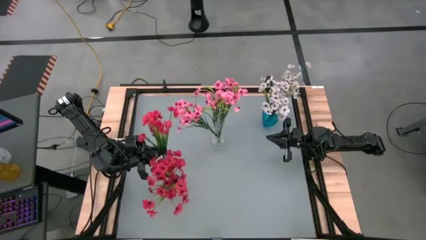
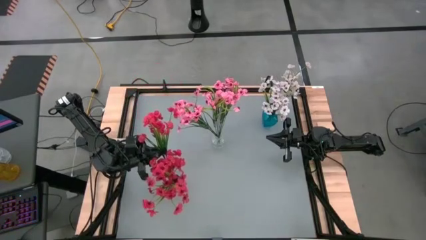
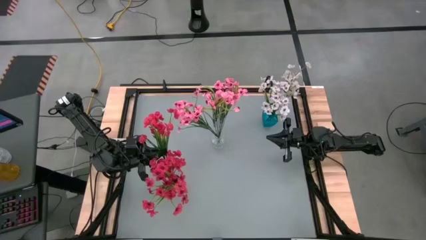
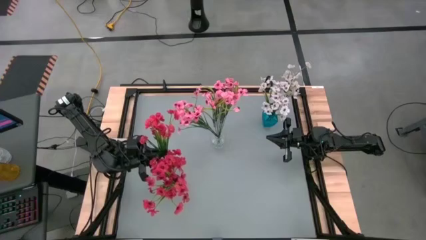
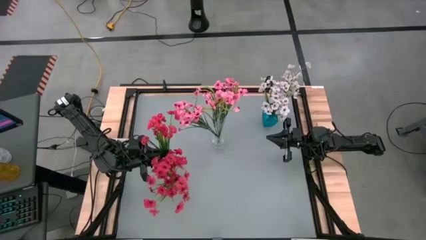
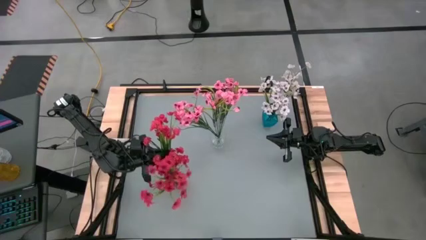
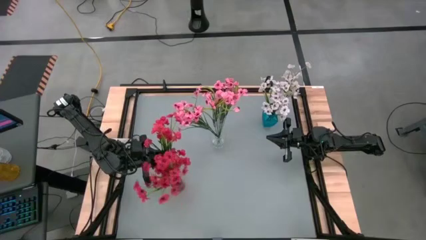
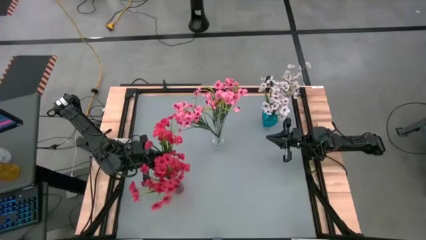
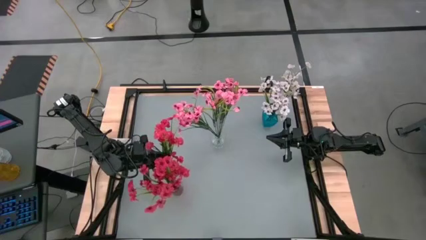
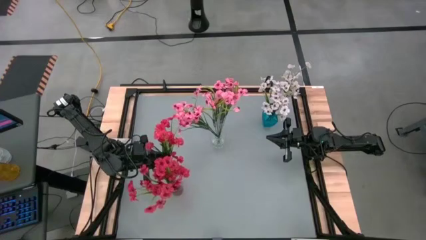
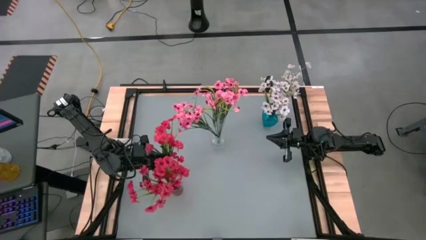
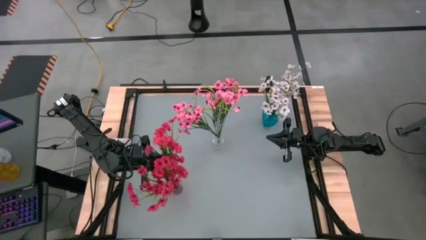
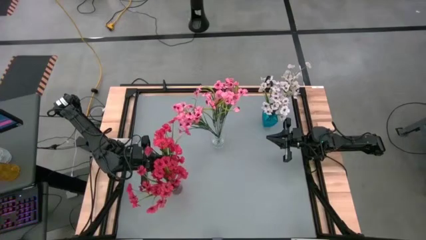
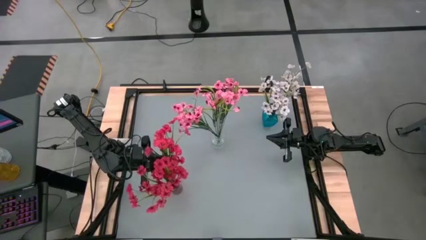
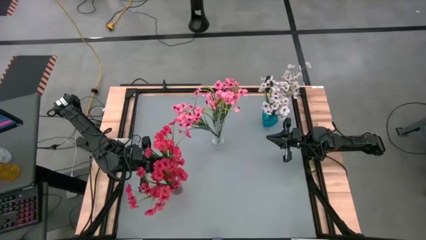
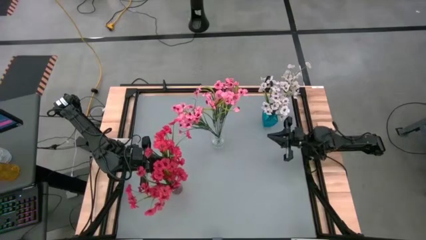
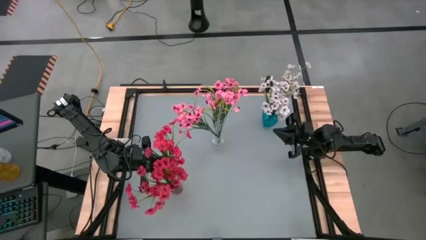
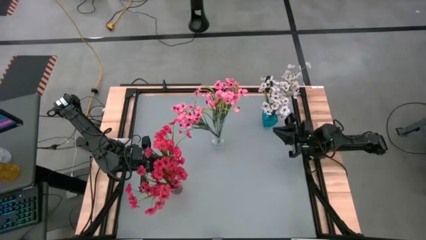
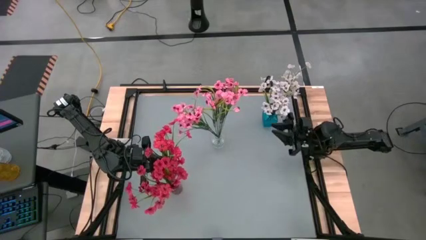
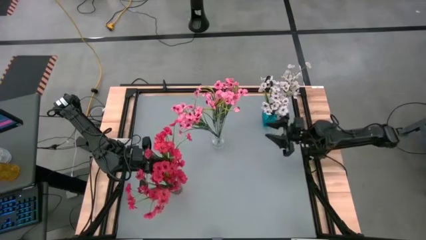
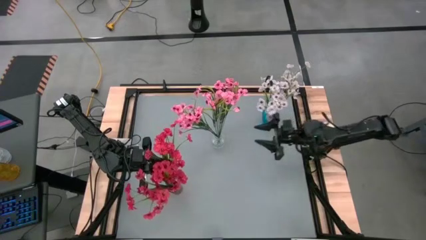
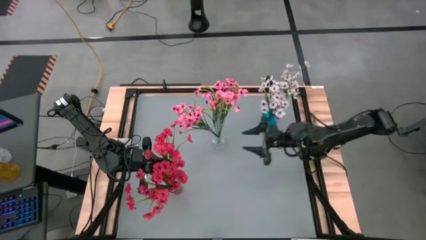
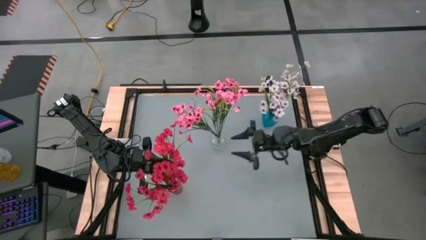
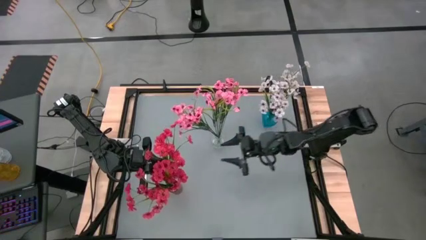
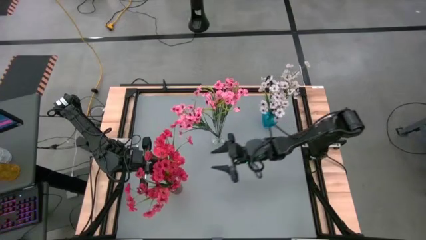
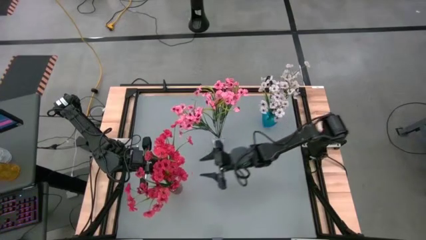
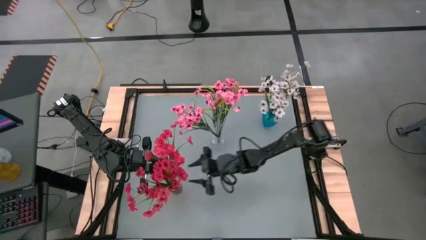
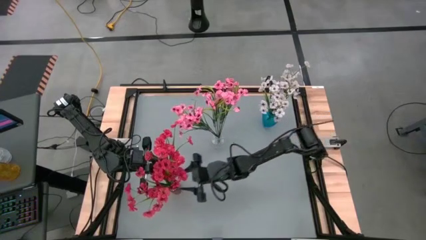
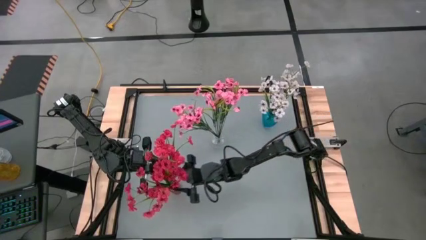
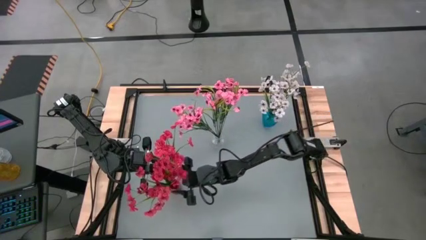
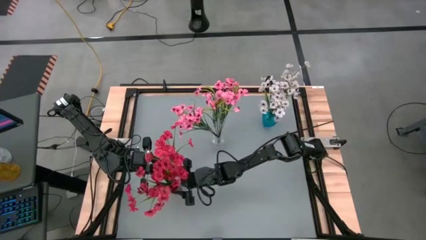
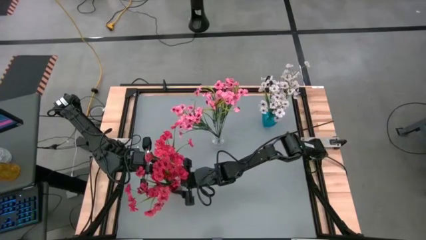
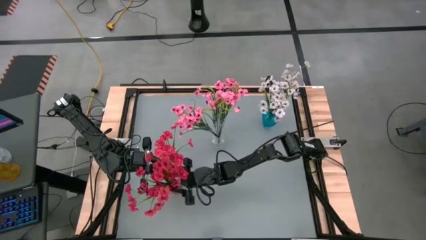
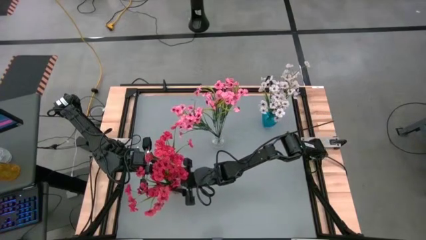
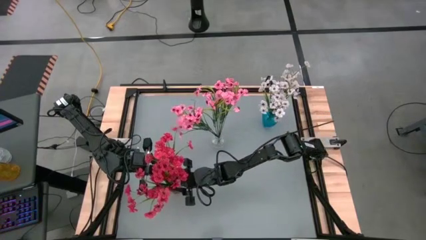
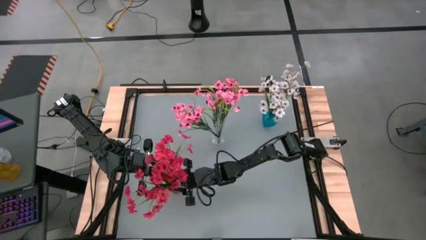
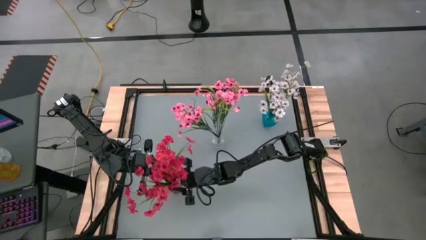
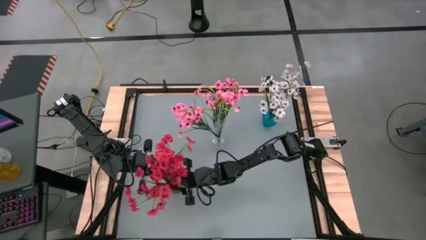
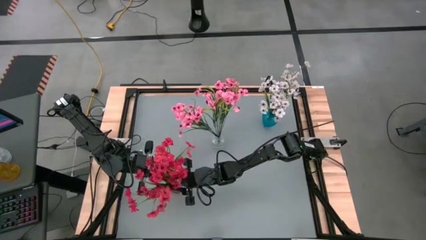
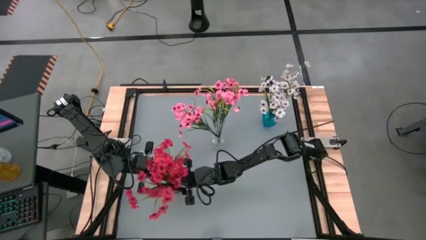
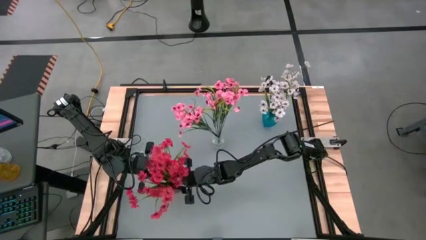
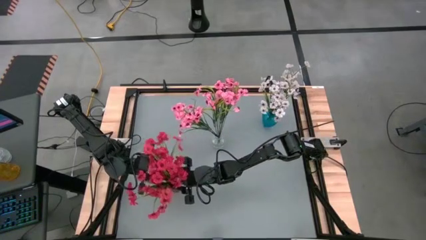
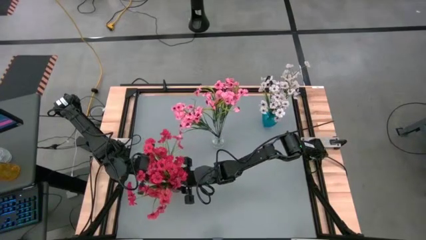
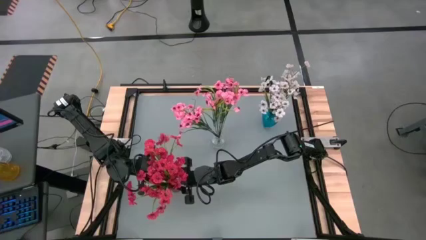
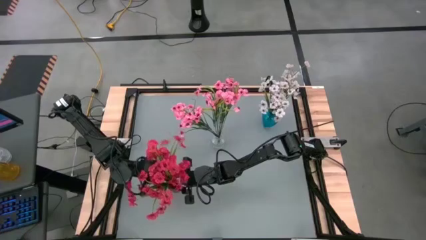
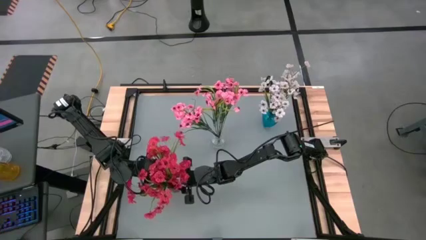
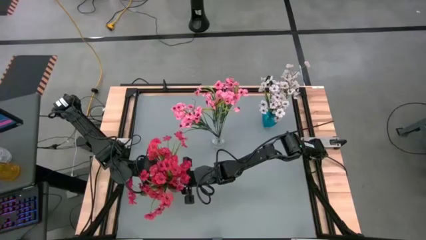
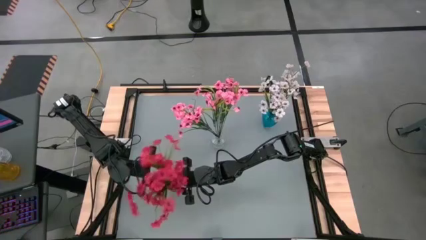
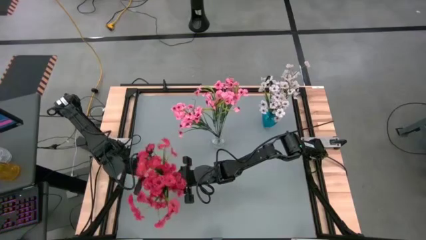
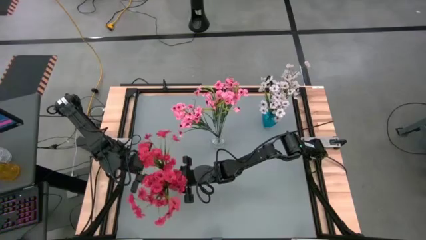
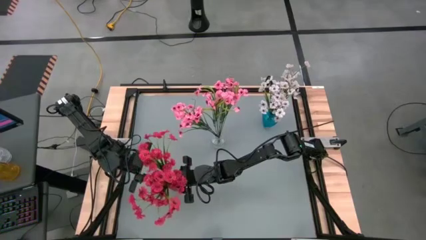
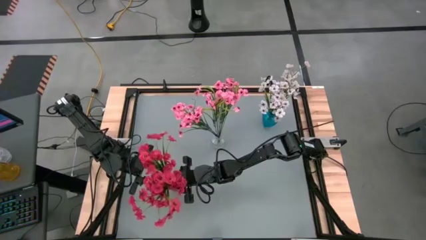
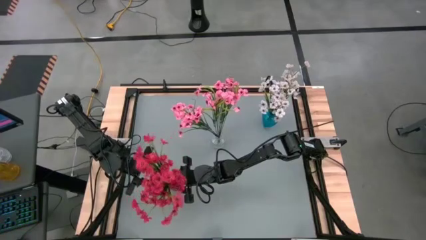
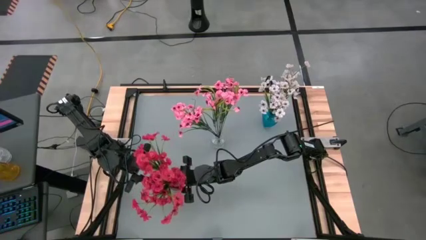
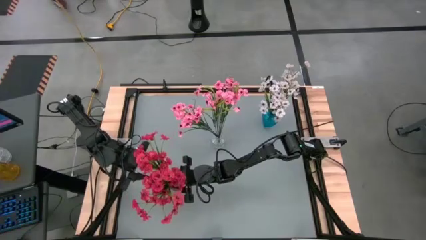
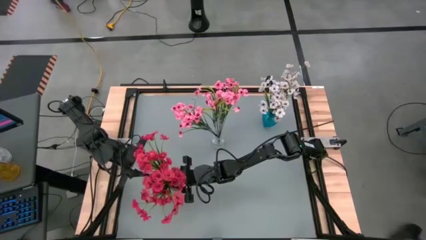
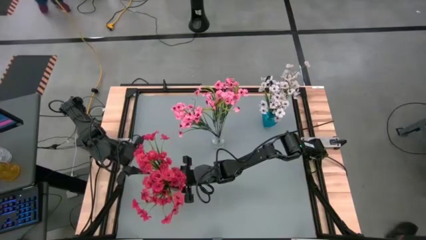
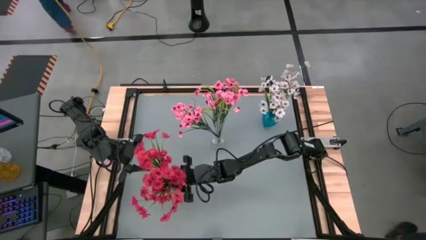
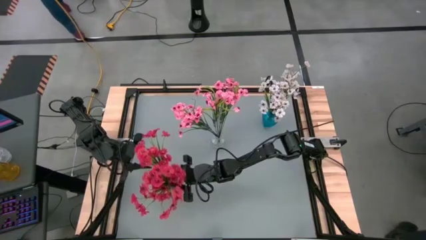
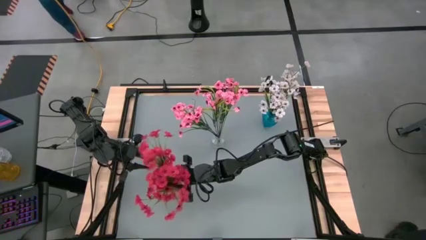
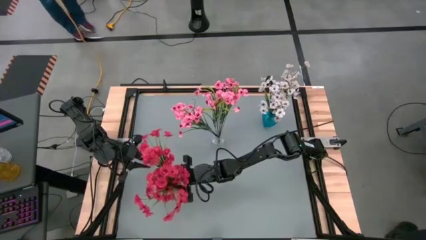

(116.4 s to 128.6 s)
Task: Sort flowers into vase by color
Put the red flowers into the red vase

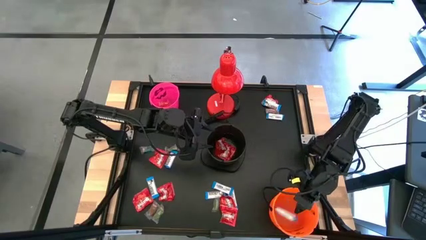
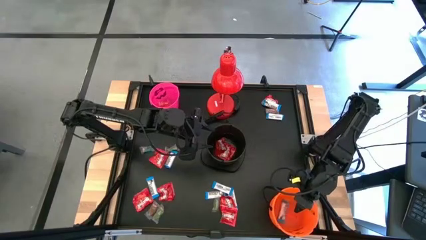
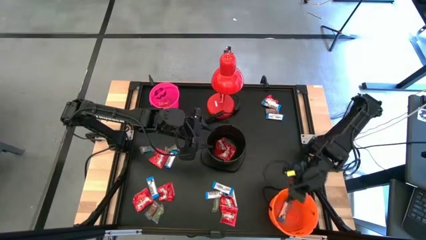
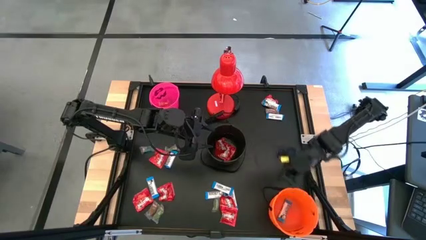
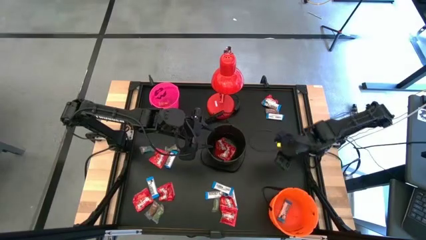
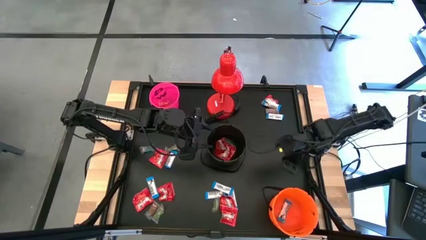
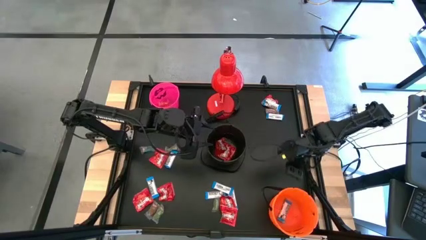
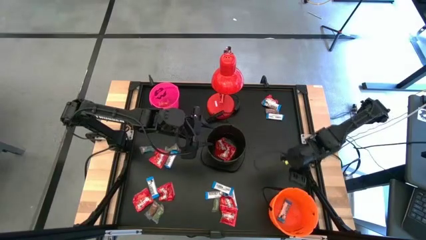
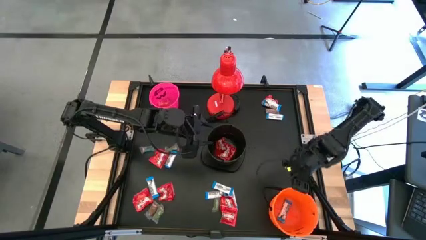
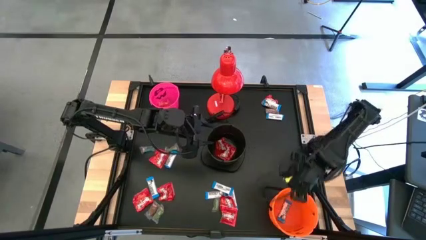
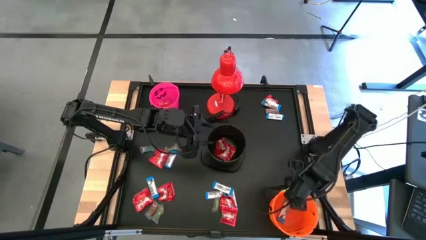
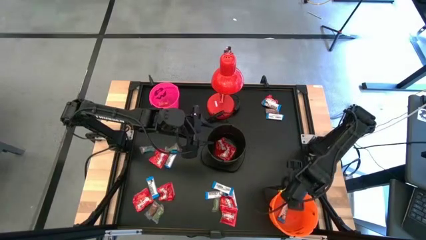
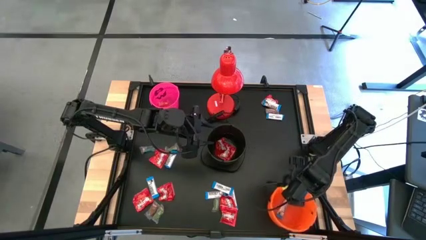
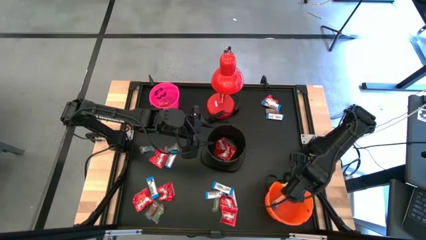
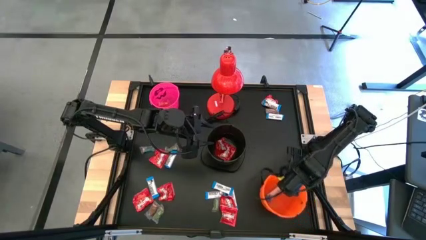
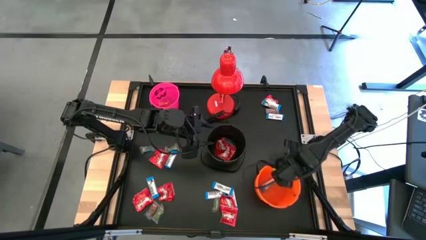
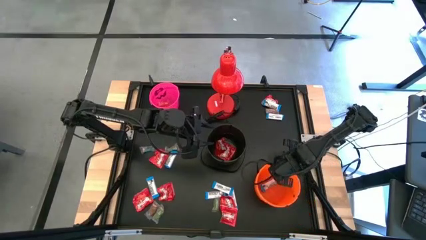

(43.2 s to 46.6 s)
Task: Organize candy in baskets
Adjust the orange bucket

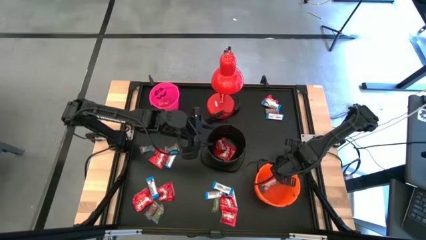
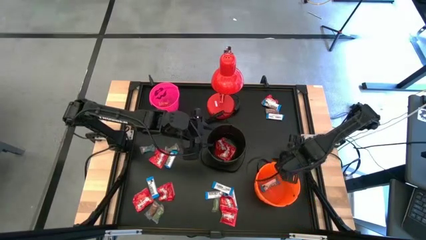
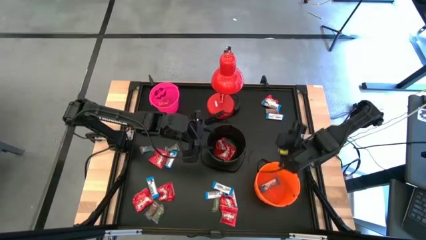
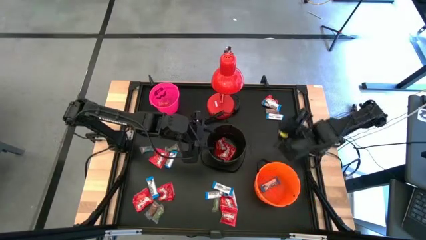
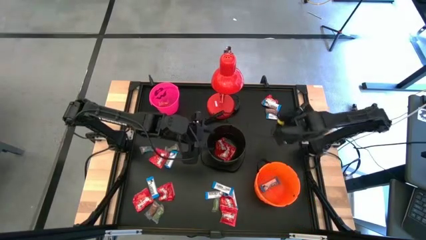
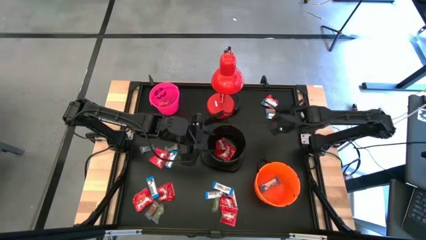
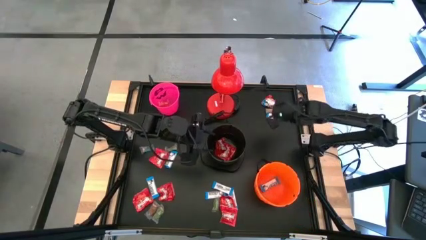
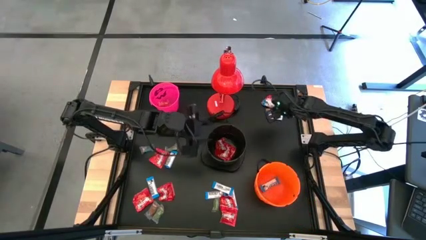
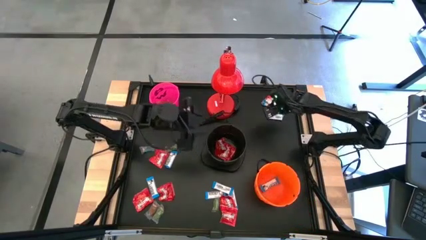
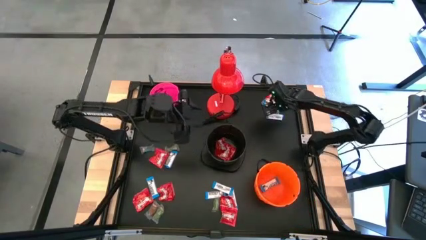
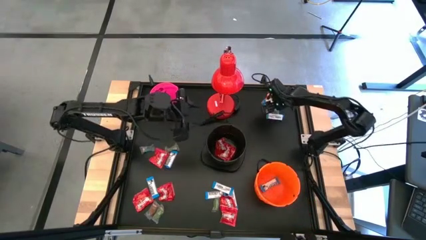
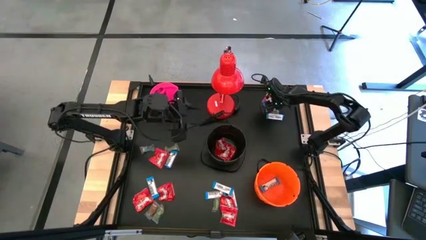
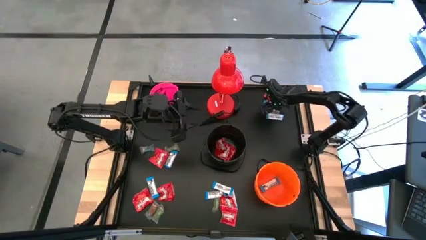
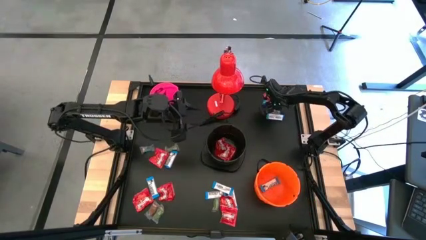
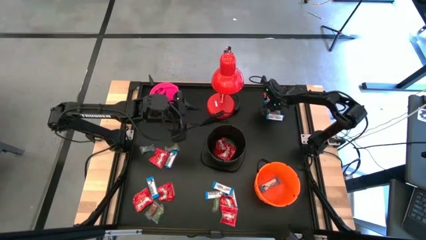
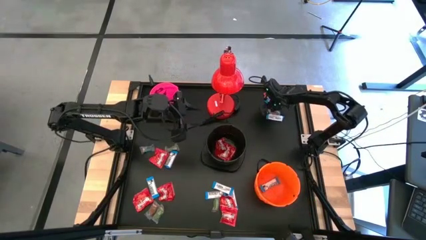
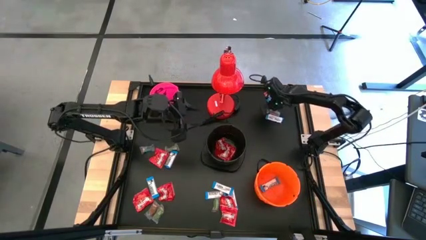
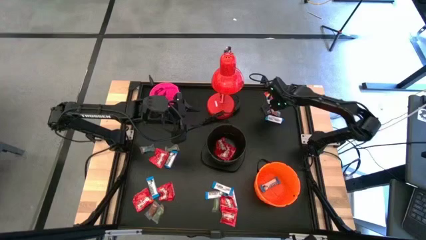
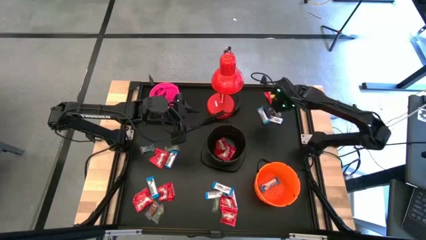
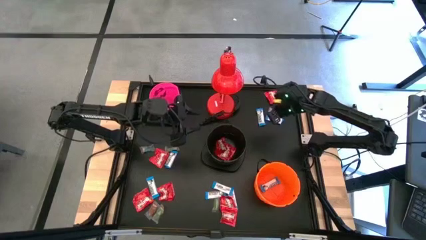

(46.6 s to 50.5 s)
Put the white chocolate into the orange bucket
